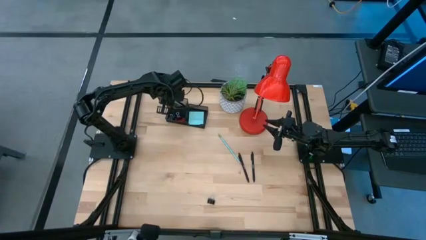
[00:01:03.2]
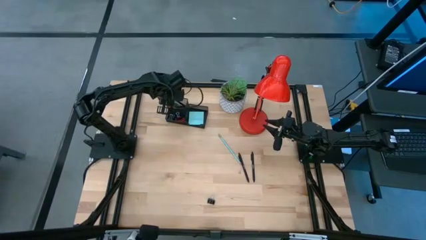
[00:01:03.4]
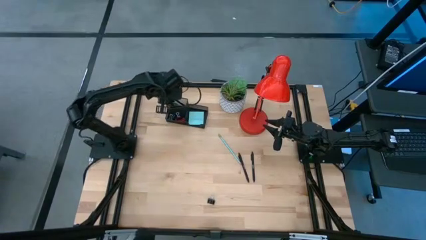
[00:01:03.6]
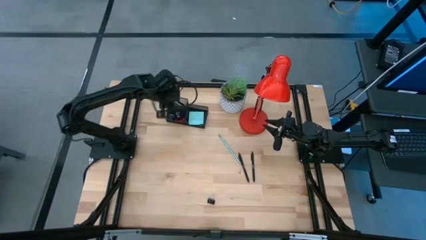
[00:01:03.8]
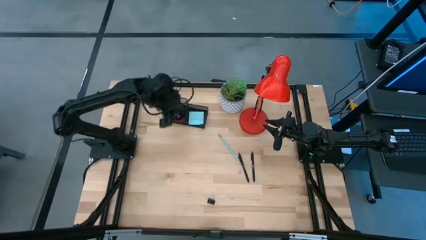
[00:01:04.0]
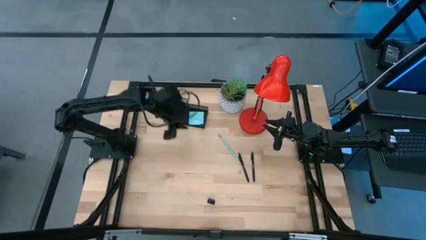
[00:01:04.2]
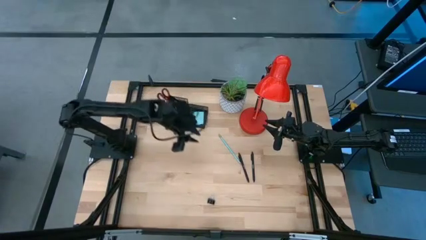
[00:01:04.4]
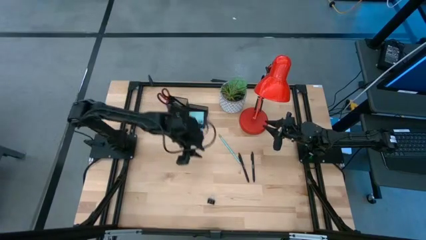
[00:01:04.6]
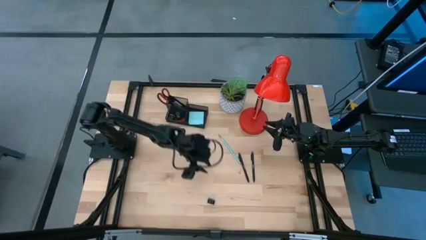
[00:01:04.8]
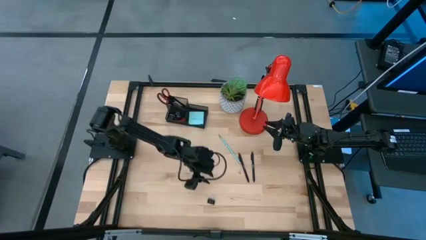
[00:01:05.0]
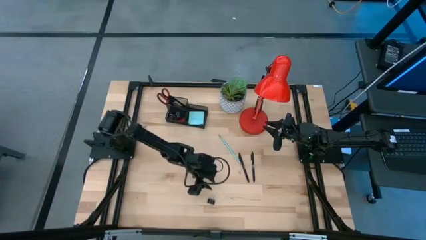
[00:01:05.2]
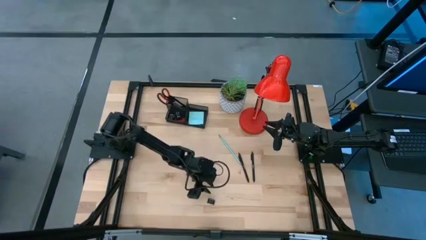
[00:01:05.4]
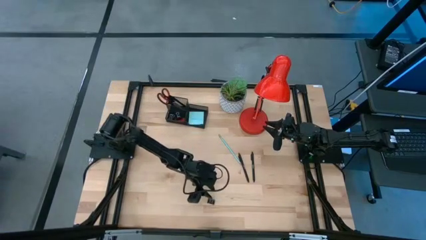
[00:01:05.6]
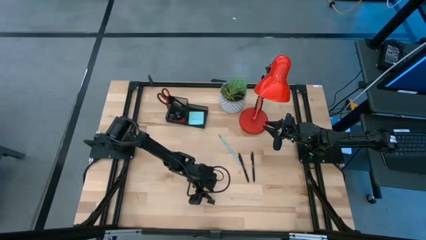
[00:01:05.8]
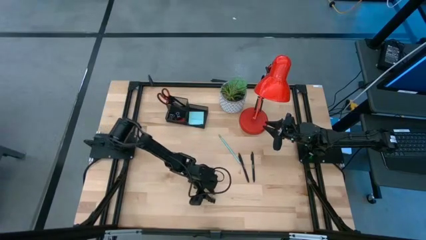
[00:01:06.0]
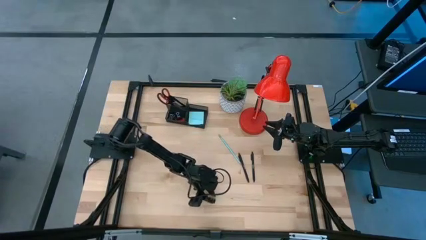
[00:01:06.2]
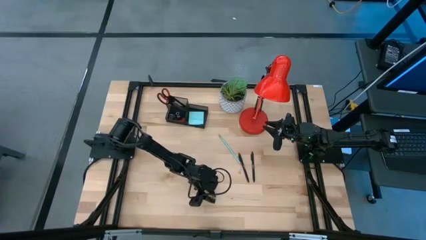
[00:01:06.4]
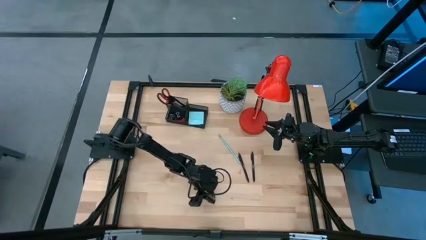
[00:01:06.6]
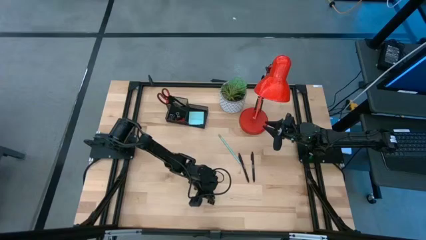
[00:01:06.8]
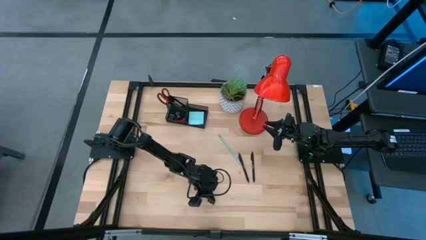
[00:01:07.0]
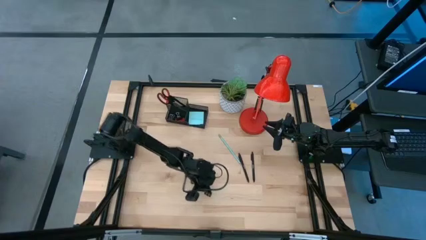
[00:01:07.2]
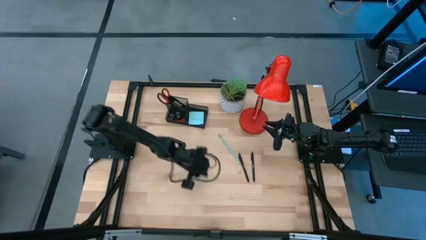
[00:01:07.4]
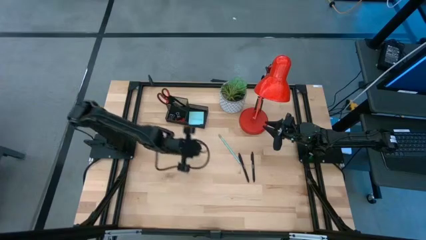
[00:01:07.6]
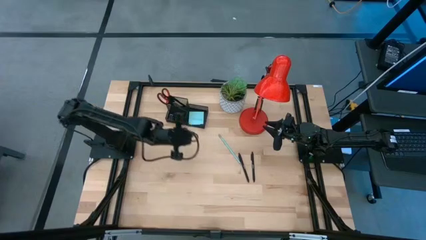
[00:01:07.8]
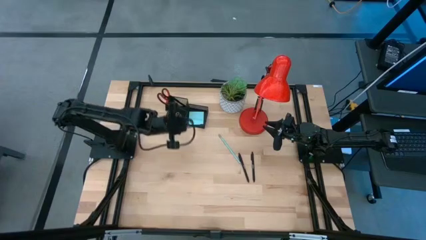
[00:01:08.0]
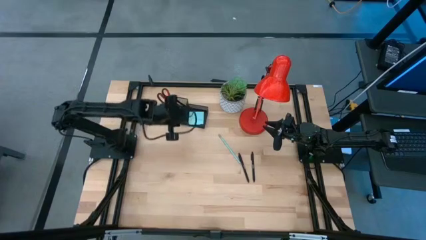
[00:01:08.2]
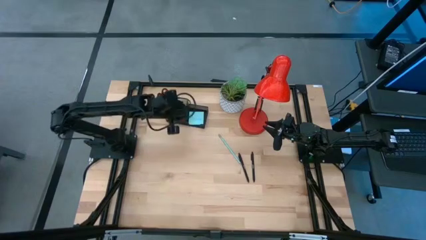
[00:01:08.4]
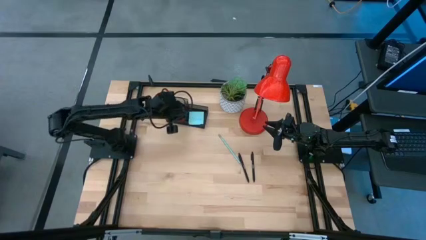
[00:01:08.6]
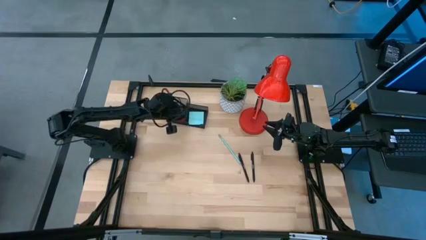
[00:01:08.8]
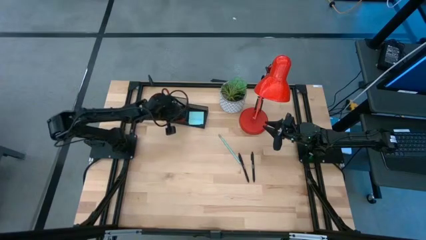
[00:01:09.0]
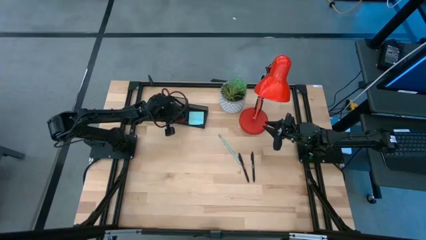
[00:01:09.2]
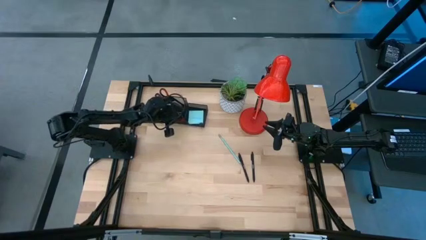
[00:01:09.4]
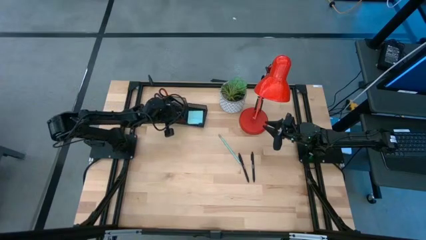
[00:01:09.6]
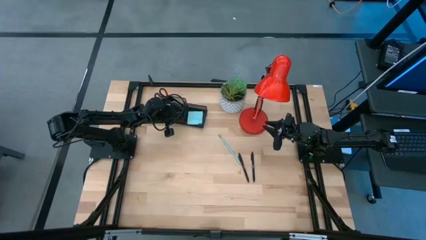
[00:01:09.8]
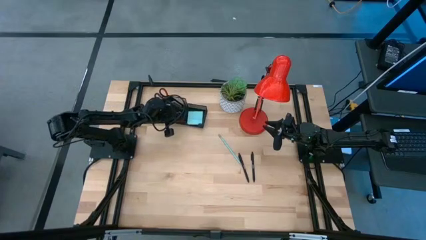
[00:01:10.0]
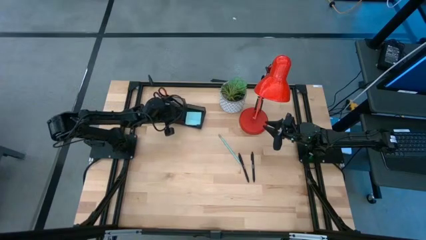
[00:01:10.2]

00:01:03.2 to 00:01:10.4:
Task: Pick and place office supplies into organizer
Put the black binder clip into the black desk organizer

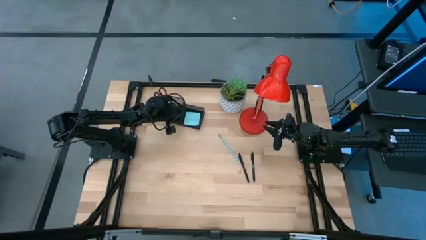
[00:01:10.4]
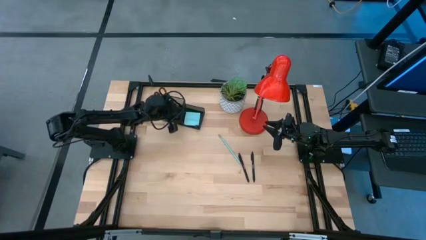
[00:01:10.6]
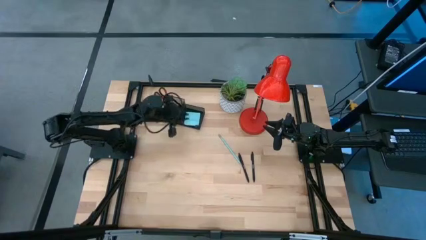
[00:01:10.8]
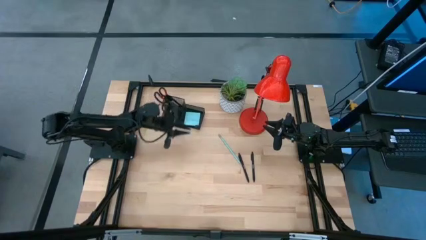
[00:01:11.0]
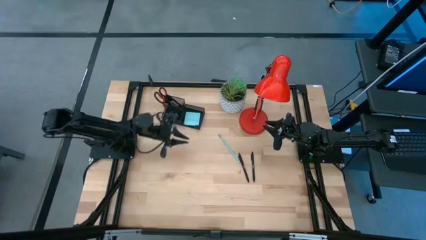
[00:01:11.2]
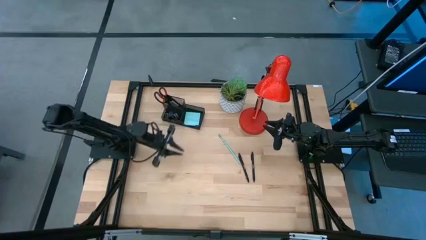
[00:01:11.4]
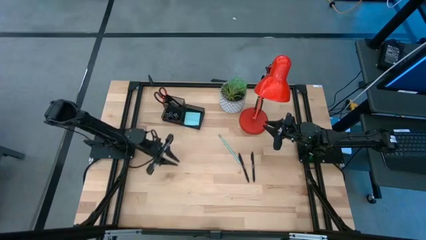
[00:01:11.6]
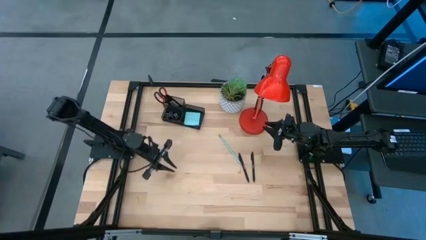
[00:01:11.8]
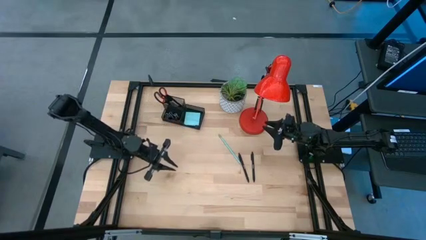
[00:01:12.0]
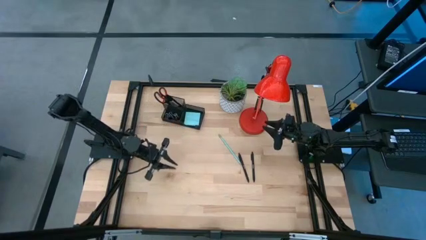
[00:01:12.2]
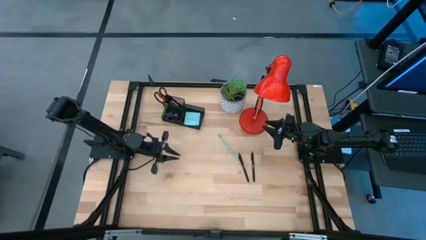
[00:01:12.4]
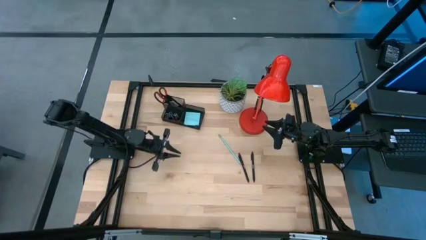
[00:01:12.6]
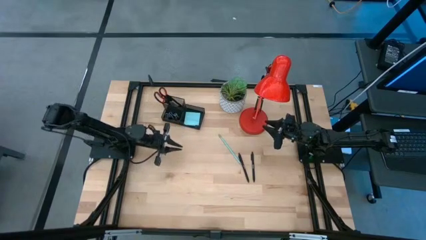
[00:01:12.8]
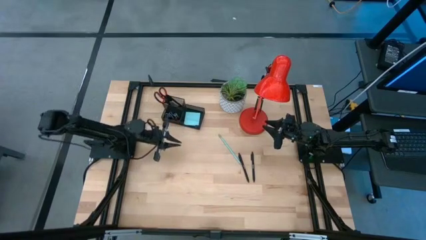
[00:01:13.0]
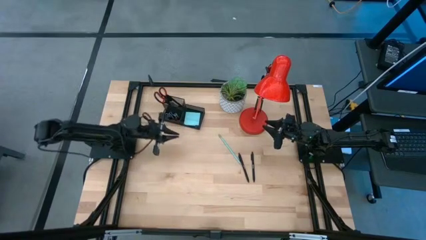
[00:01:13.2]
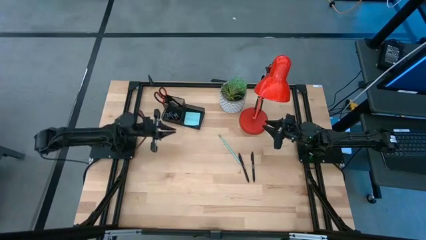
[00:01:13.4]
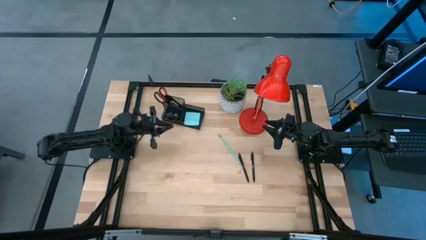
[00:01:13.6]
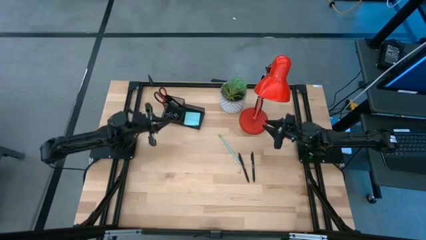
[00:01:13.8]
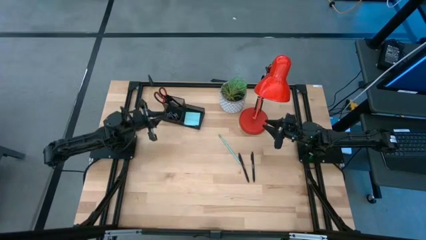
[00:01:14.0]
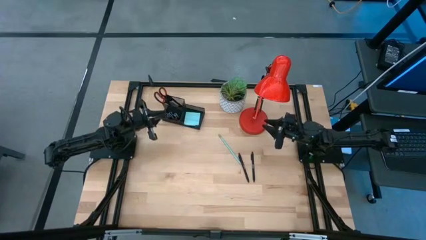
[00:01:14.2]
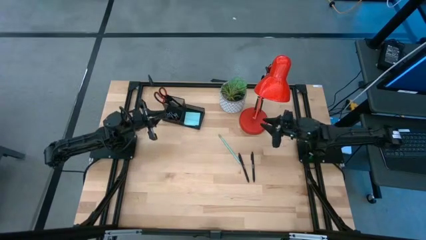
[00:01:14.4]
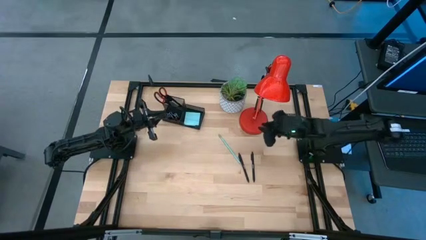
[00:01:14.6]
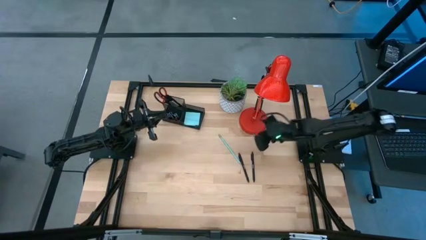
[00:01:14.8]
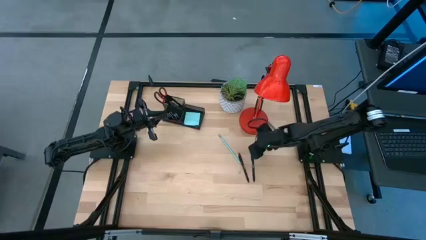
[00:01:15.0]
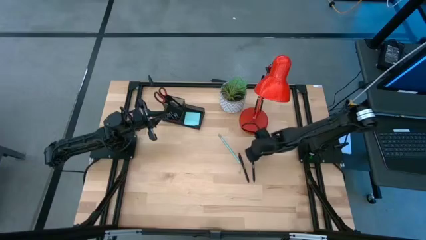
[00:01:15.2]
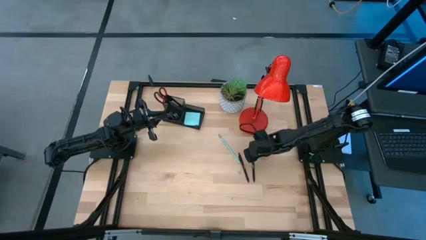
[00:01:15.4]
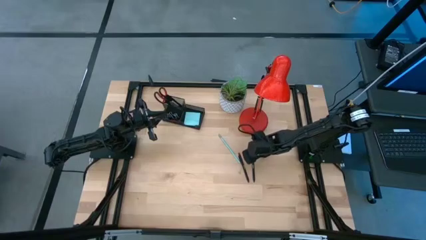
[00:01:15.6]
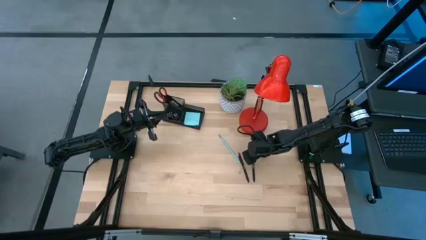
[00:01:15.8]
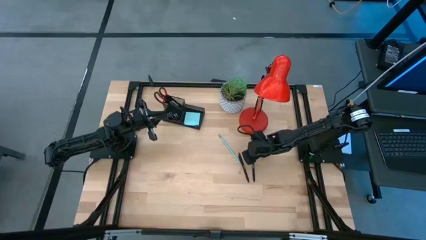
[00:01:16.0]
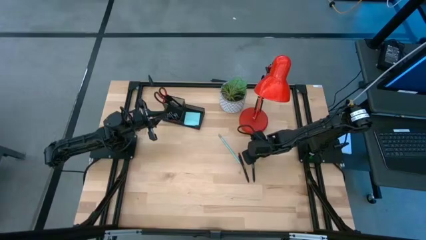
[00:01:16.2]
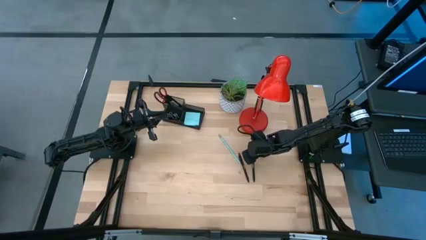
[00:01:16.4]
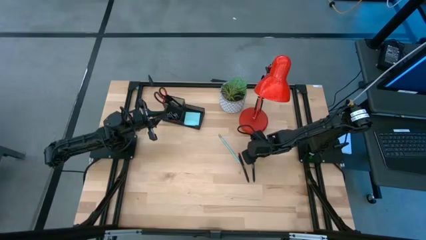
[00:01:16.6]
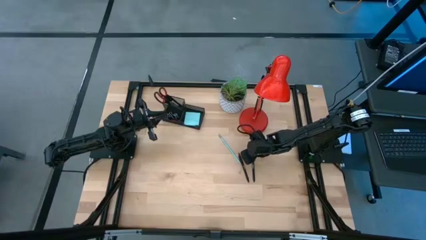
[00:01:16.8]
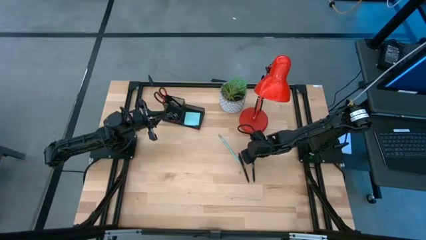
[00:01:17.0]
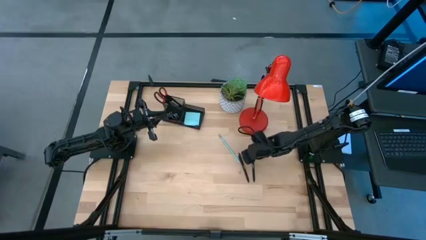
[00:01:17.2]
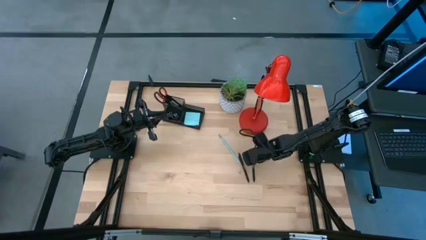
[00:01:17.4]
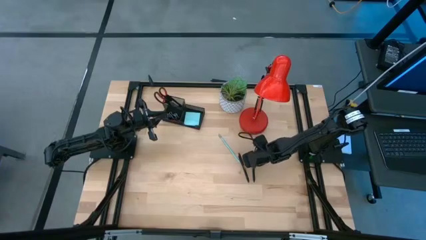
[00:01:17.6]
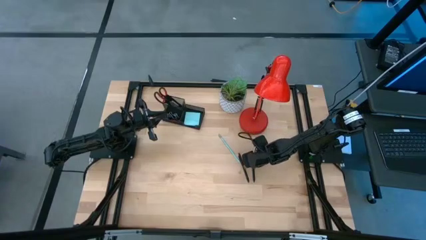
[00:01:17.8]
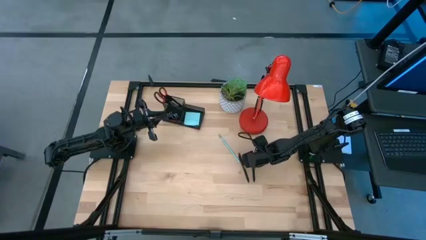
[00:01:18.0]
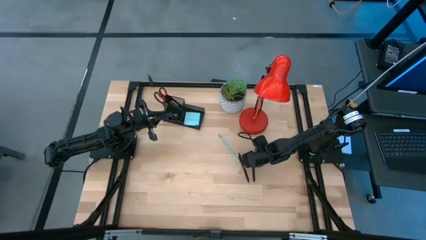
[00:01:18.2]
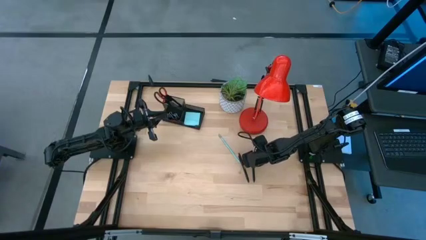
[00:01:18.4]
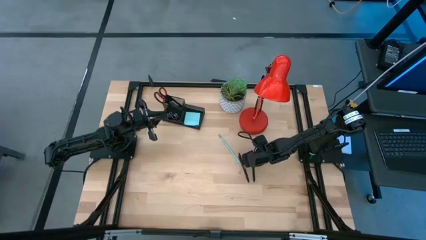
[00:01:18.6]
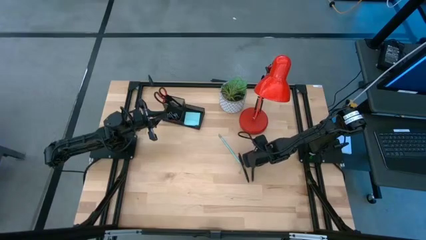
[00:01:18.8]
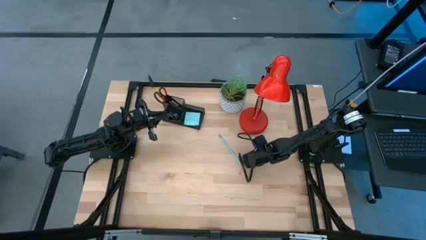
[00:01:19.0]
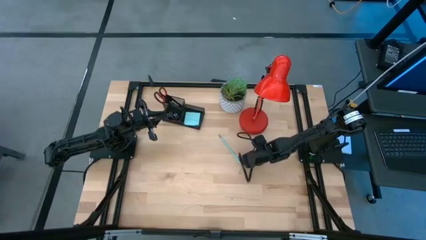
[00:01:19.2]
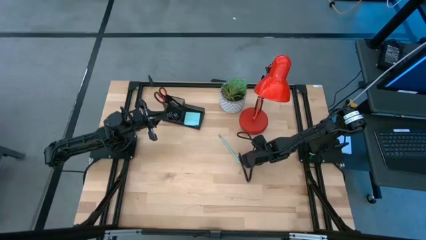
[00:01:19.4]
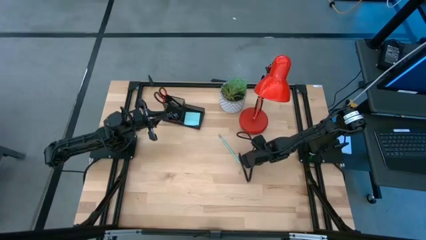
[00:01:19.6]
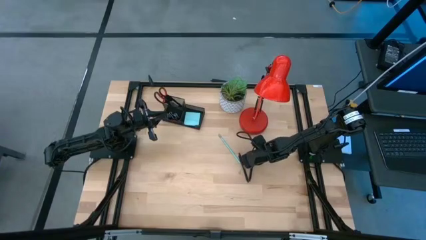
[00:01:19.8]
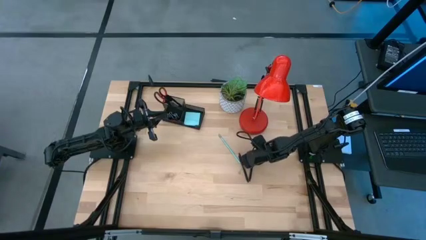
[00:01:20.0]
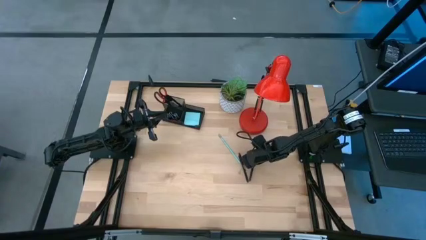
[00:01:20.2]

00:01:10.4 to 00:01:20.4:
Put the right black pen into the black desk organizer
